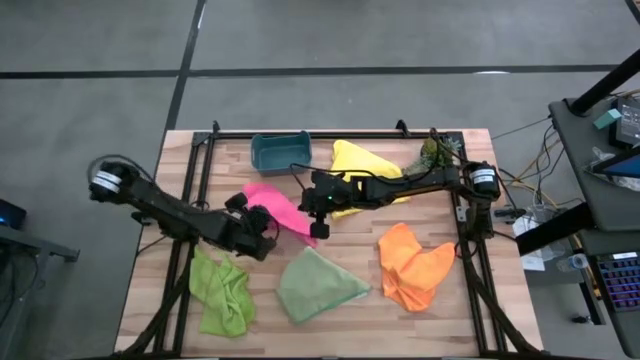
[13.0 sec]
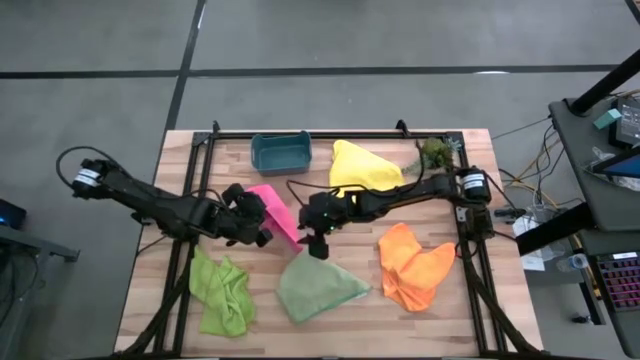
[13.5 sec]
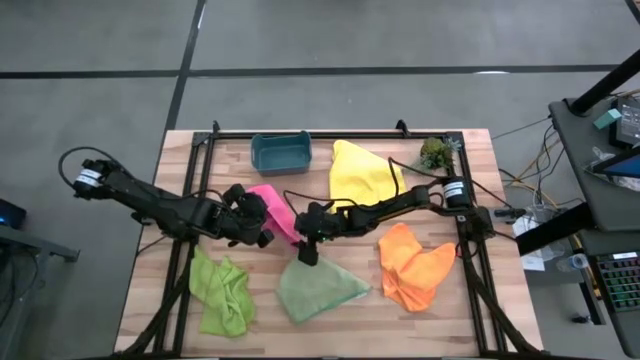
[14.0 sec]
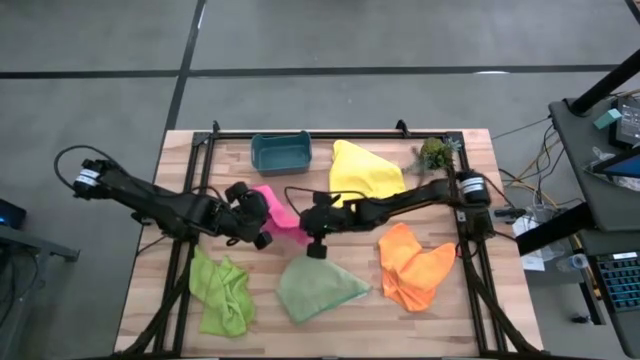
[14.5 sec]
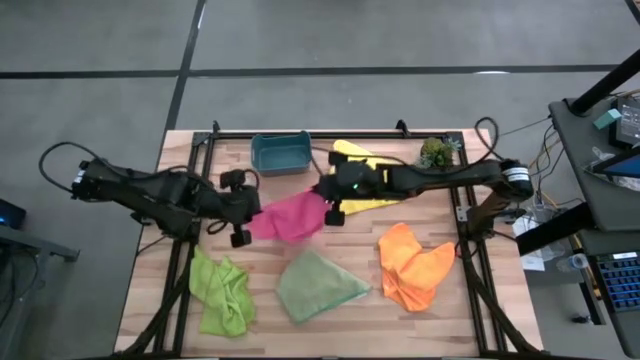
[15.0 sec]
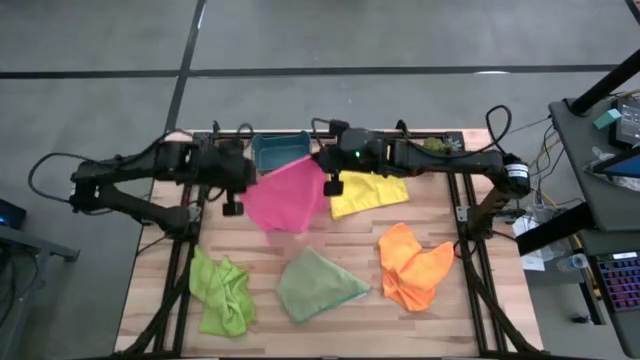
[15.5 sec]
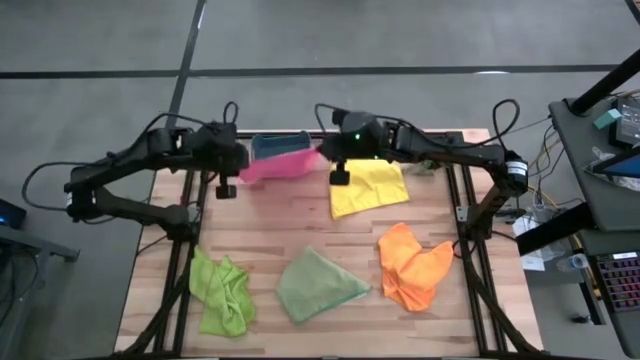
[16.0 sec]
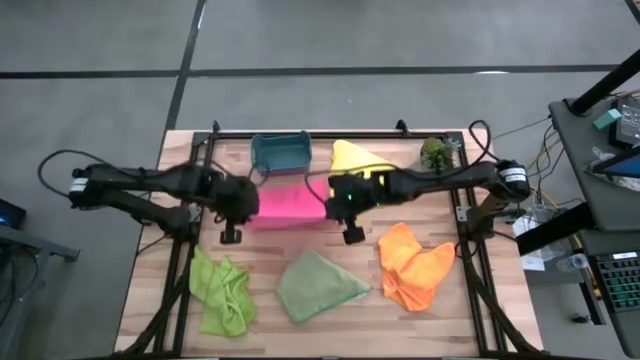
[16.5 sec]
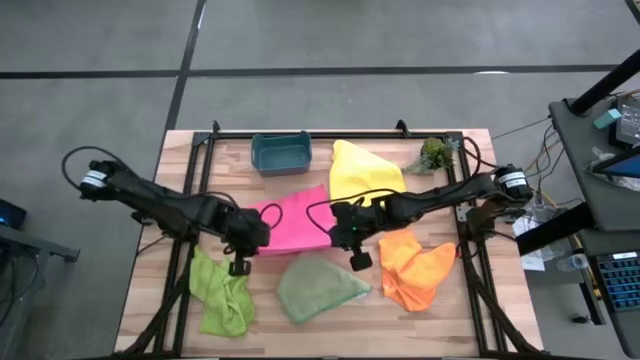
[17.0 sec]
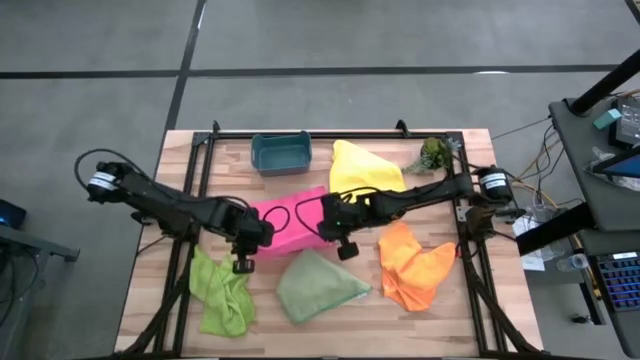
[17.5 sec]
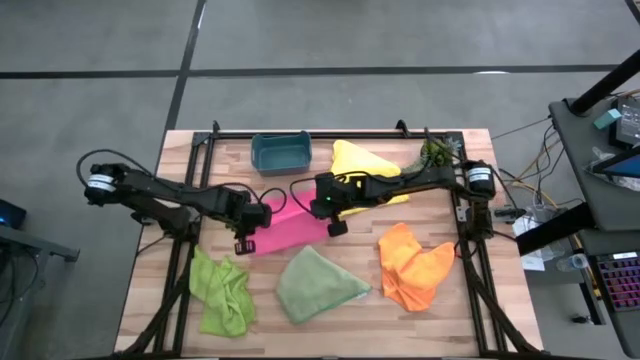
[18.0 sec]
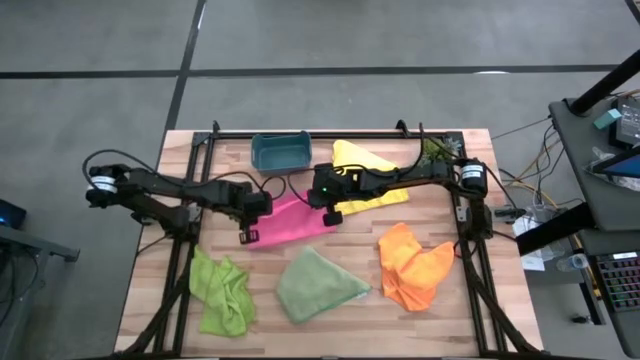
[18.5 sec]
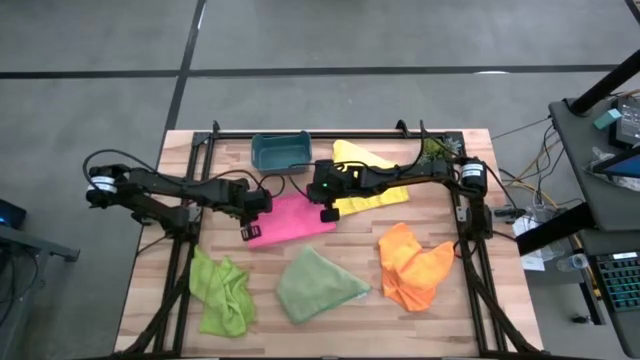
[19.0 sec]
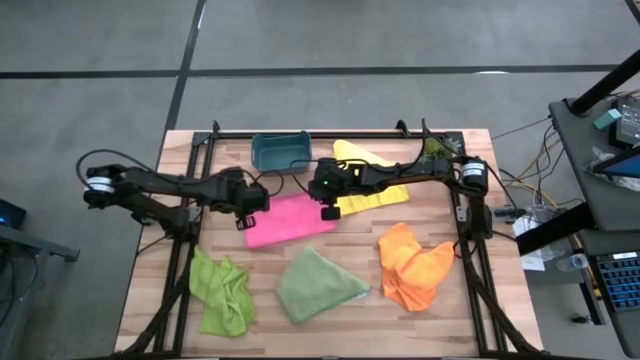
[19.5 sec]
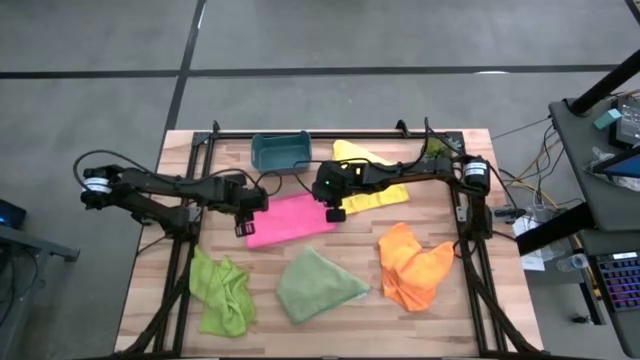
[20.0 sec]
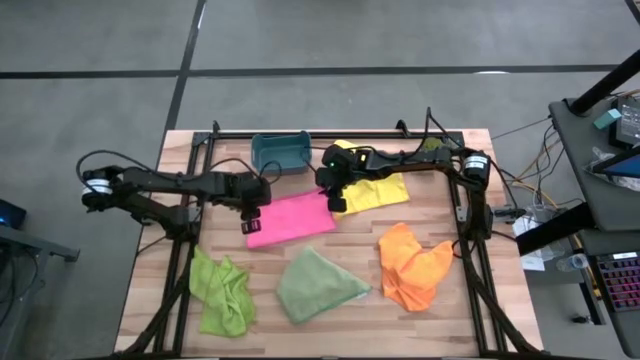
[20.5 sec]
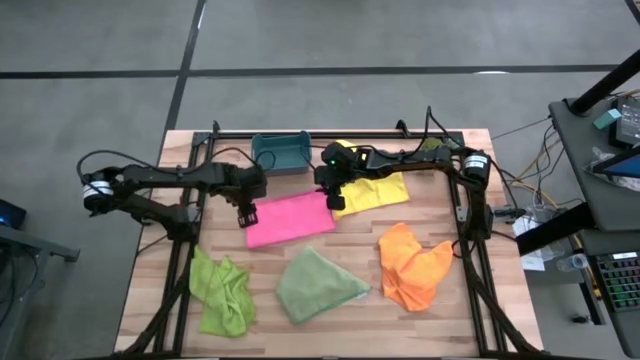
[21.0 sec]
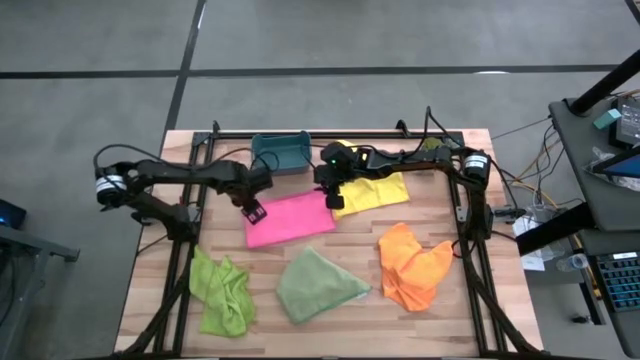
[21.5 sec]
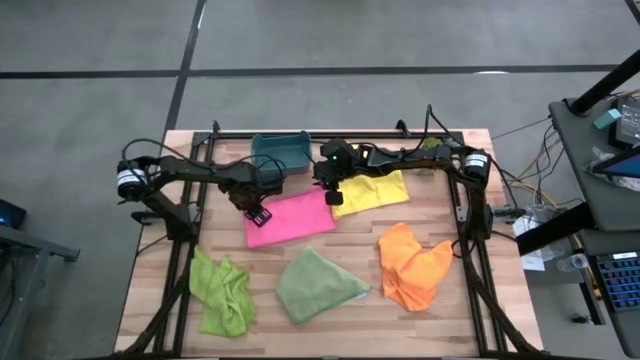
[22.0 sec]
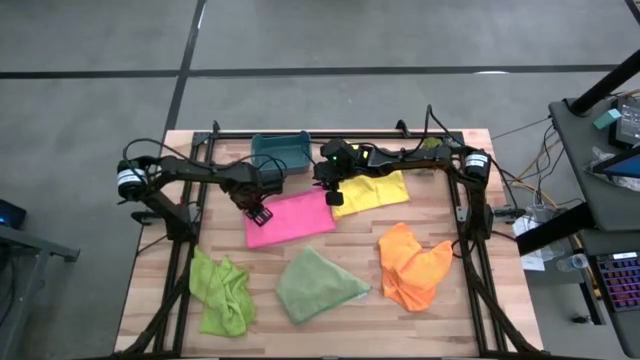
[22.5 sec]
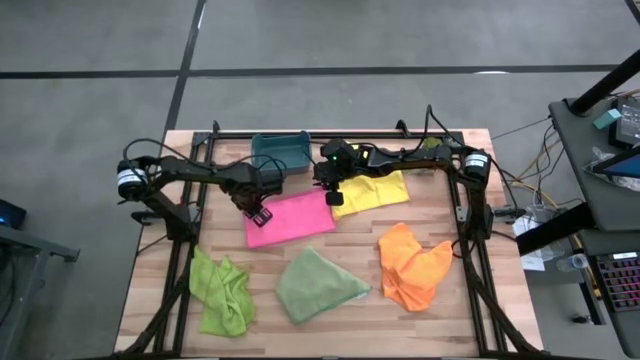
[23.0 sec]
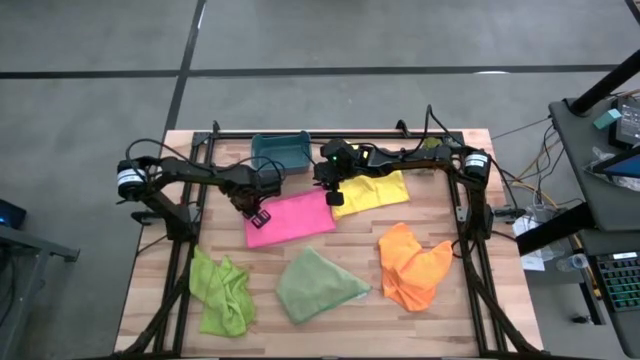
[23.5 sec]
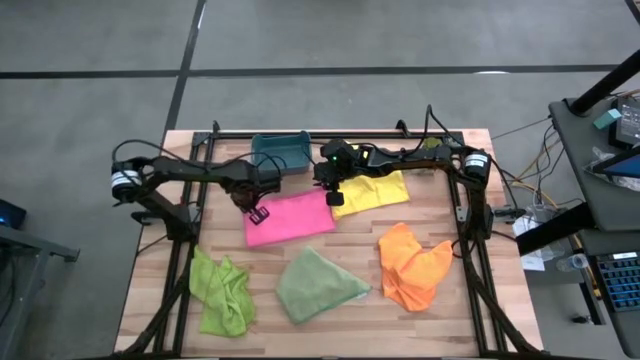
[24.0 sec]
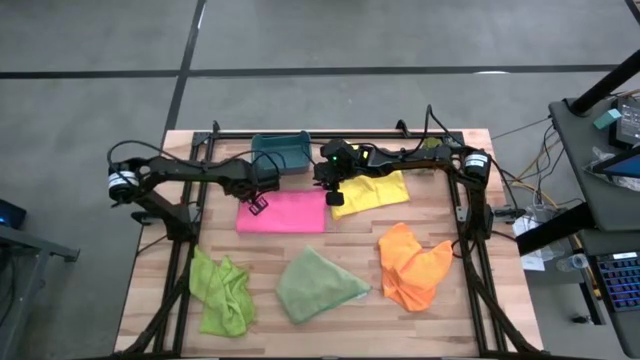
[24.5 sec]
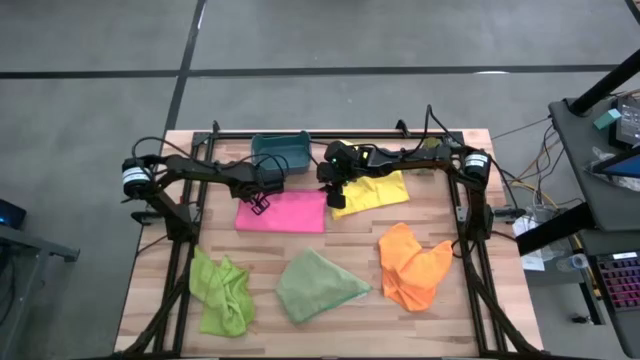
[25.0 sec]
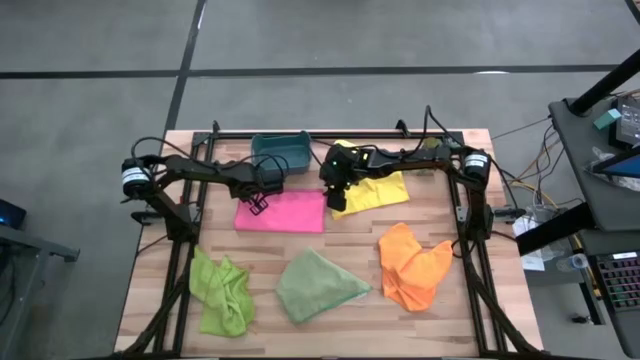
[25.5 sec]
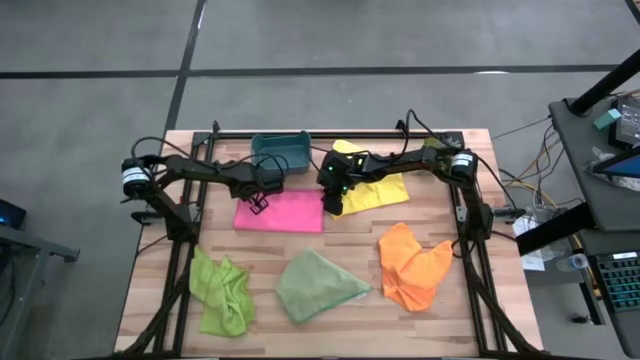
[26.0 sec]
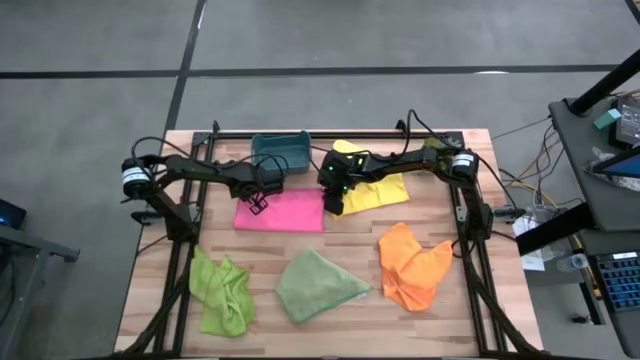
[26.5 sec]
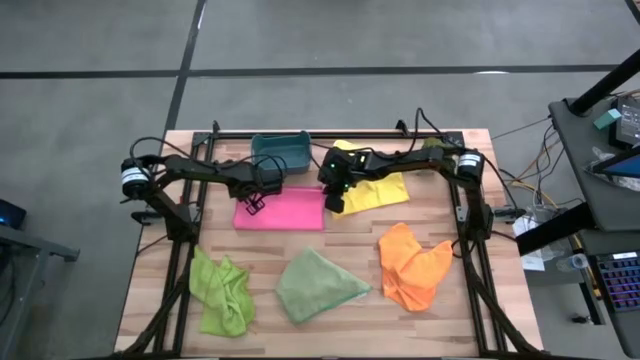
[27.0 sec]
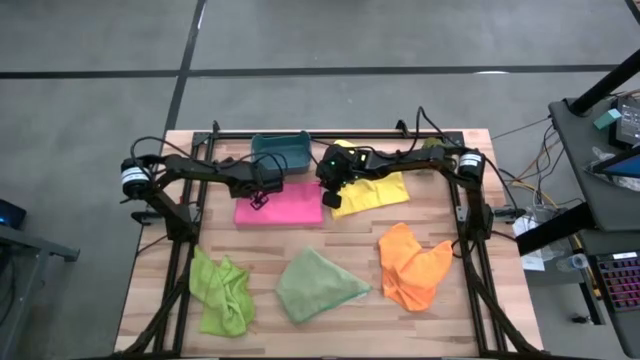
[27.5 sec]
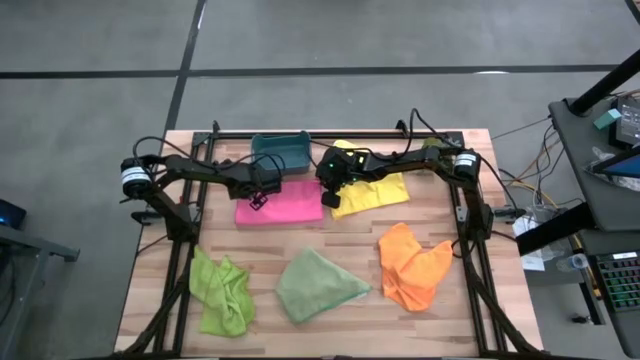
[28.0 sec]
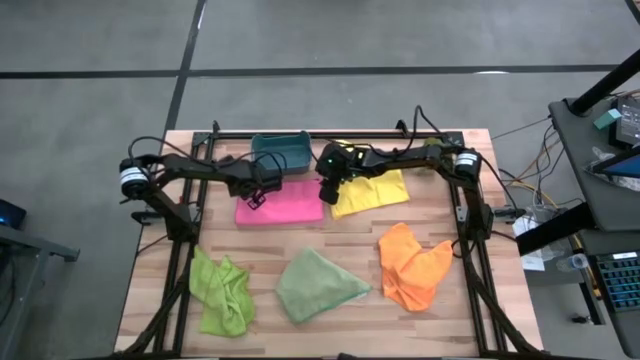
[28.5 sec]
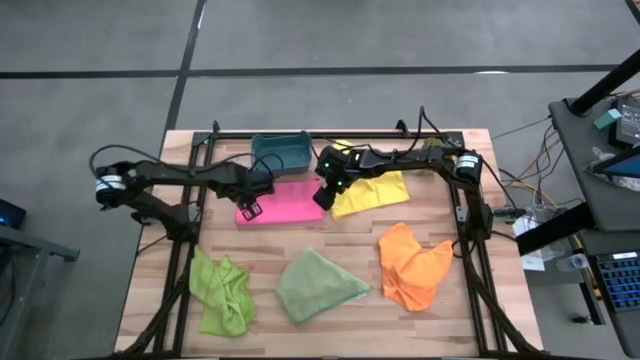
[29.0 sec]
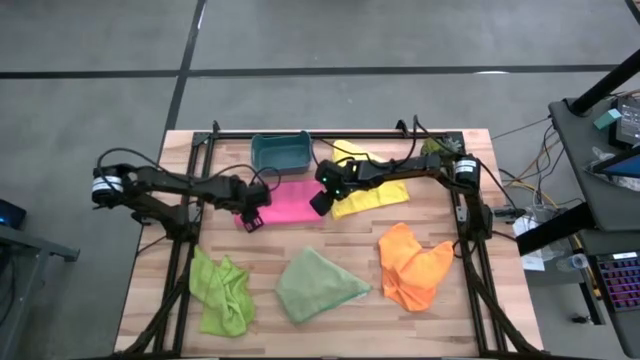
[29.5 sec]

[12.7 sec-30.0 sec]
Task: Fold microfiber towels
Fold the pink microfiber towel
